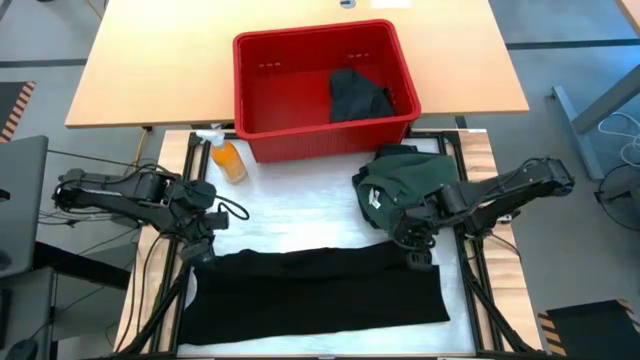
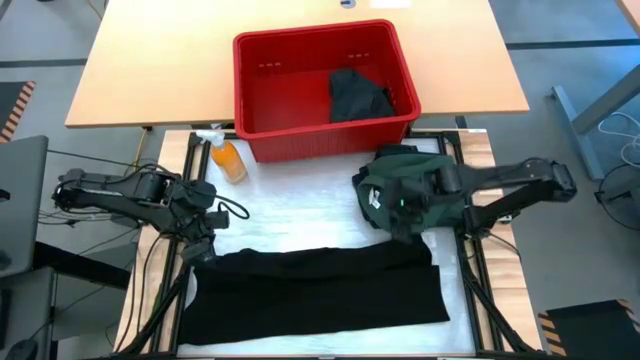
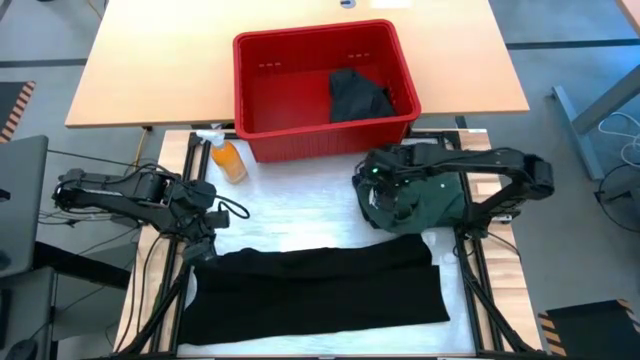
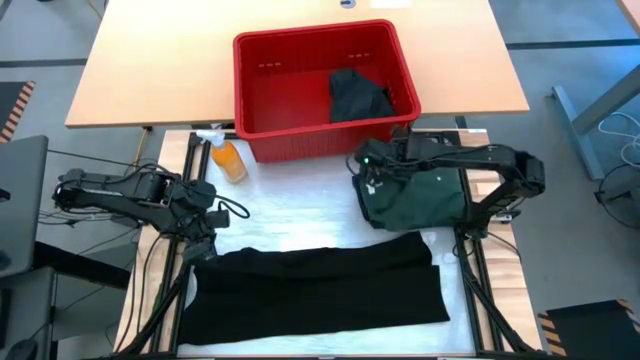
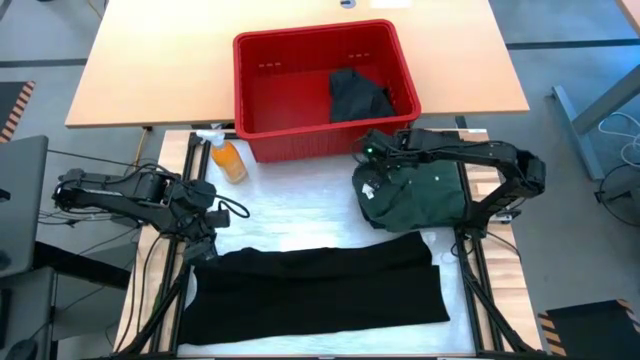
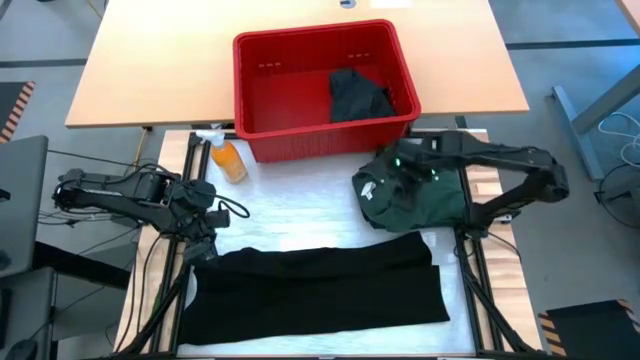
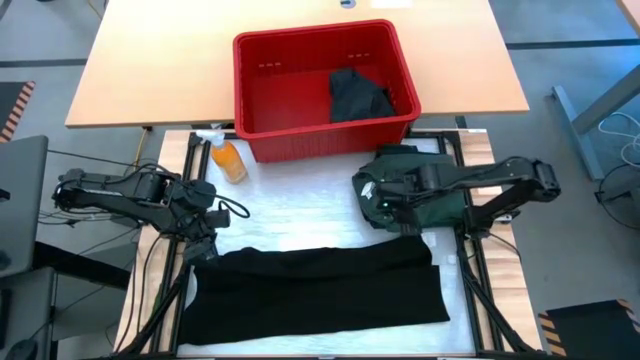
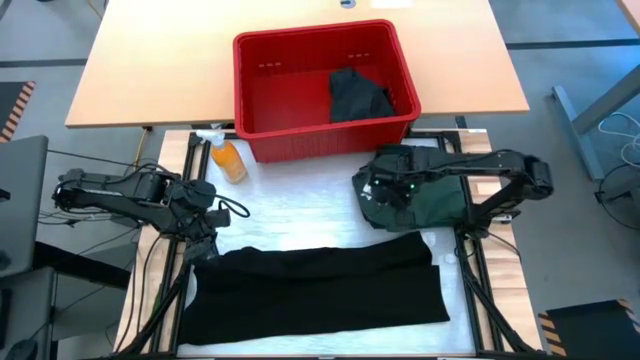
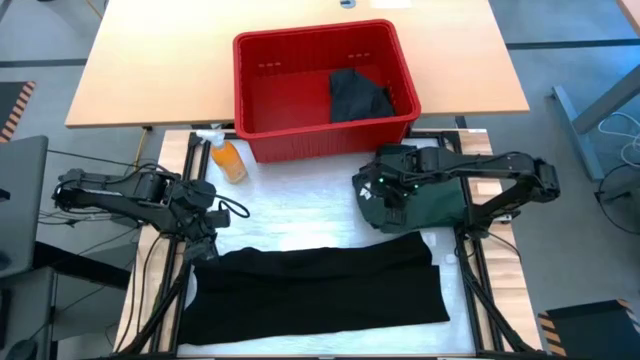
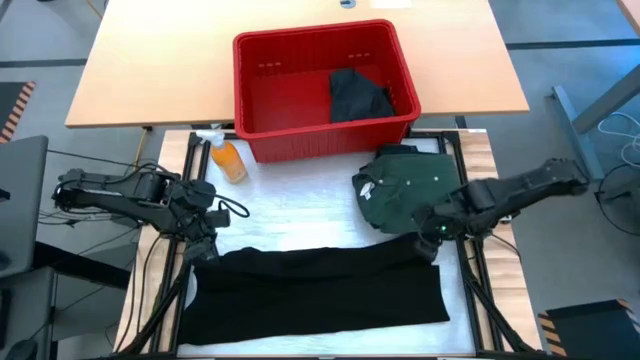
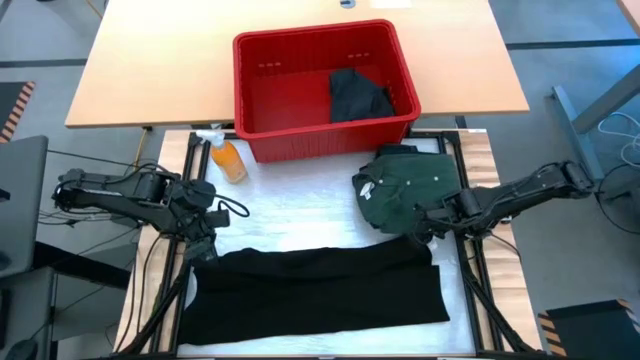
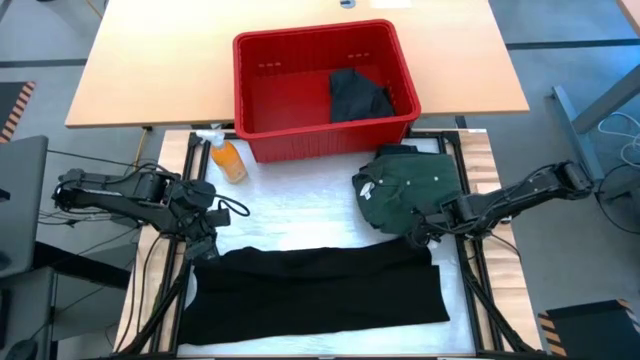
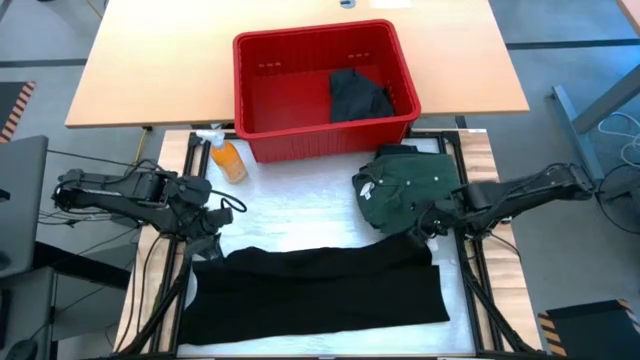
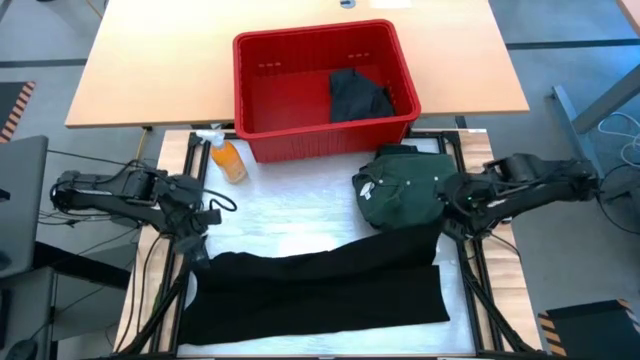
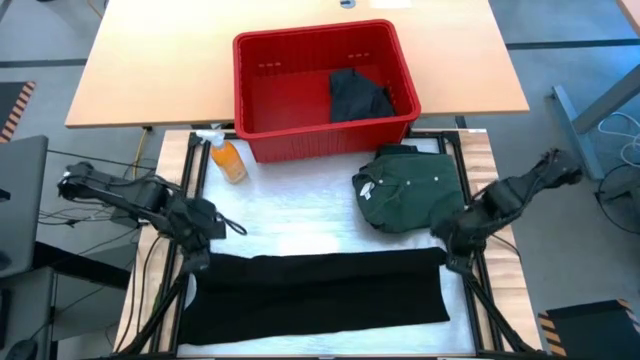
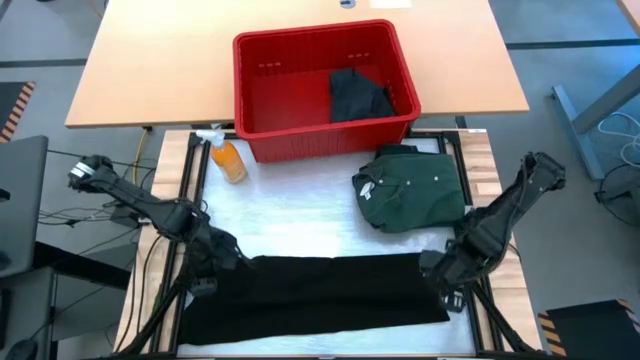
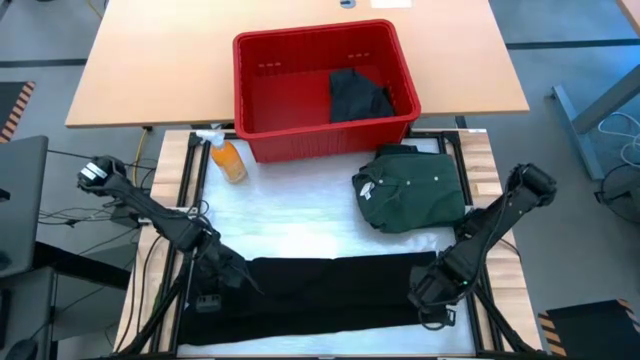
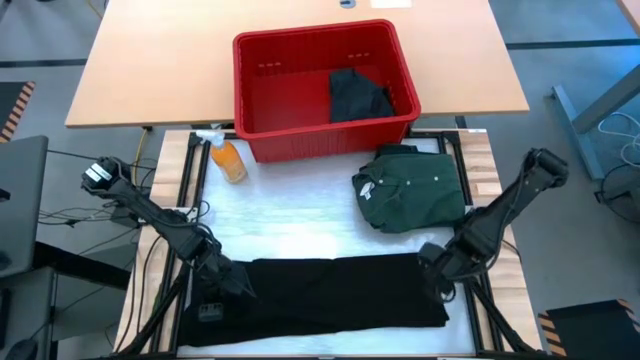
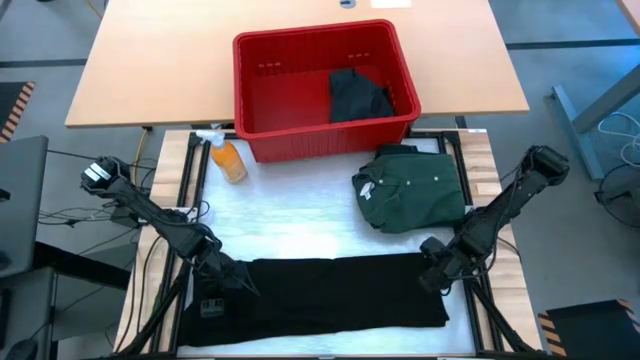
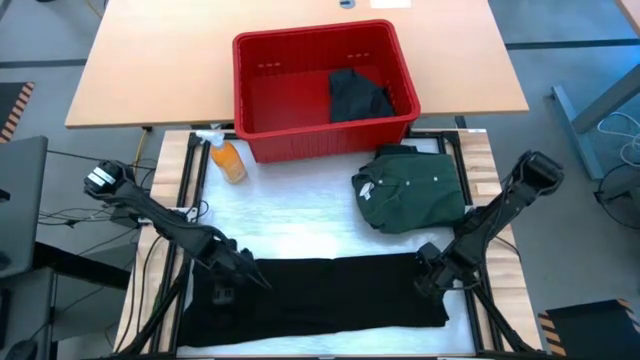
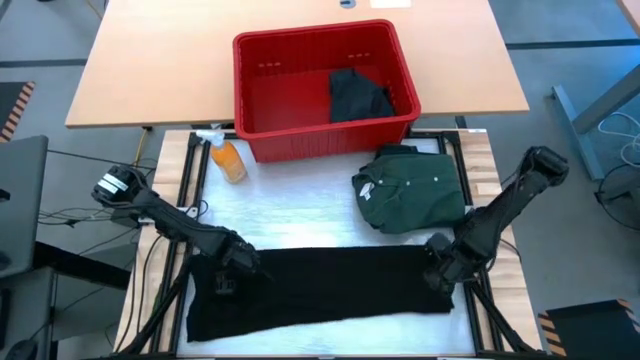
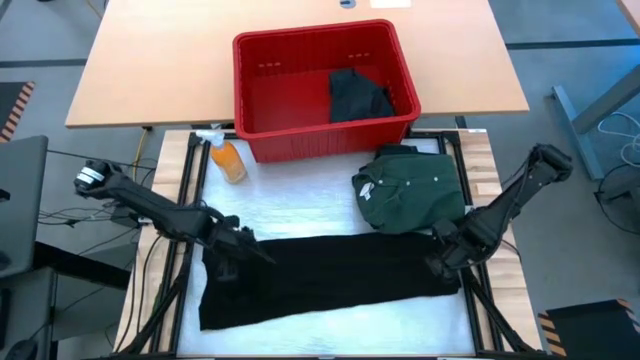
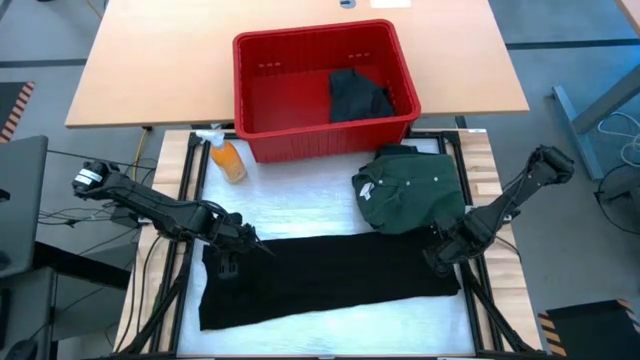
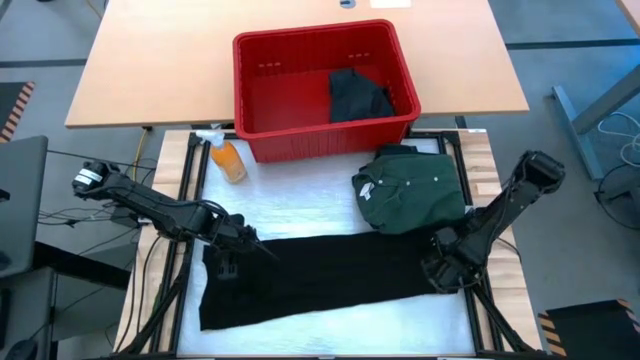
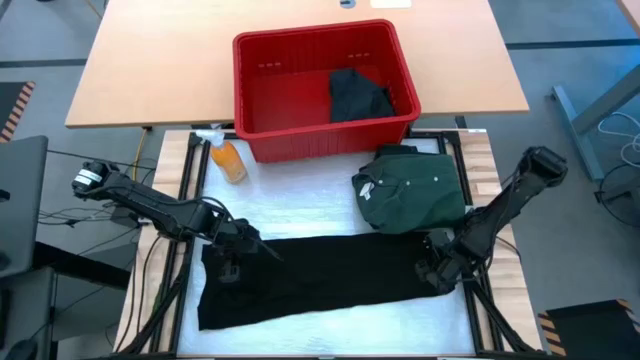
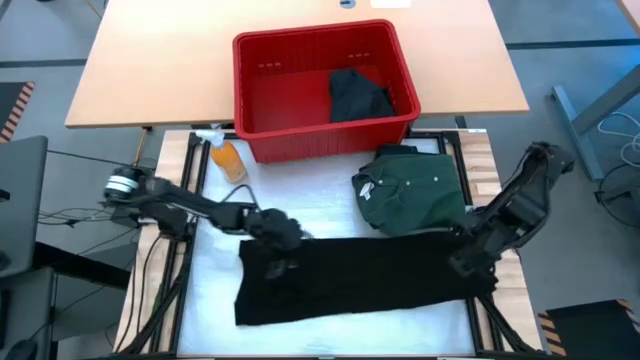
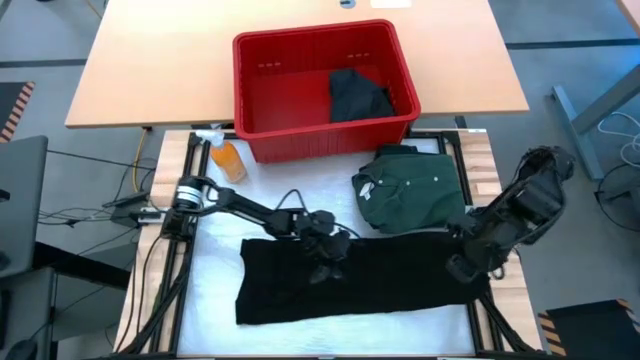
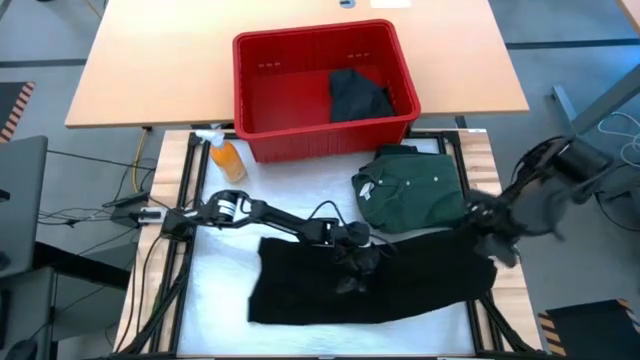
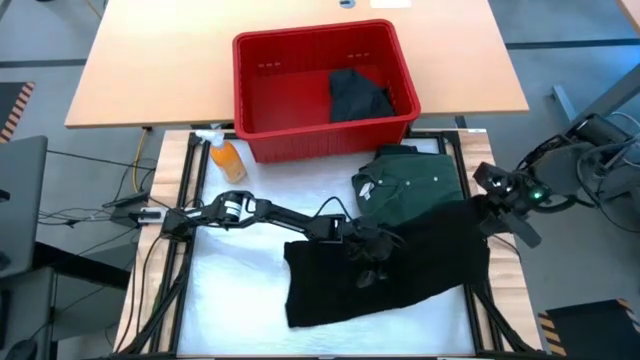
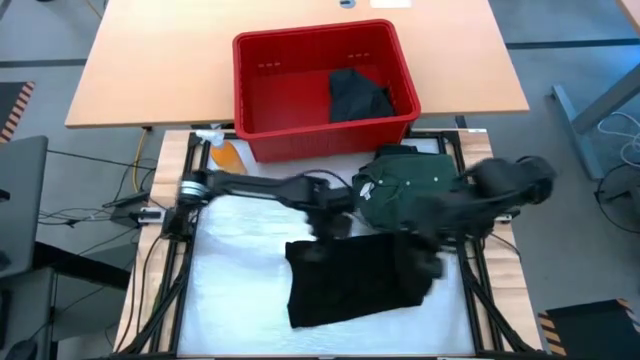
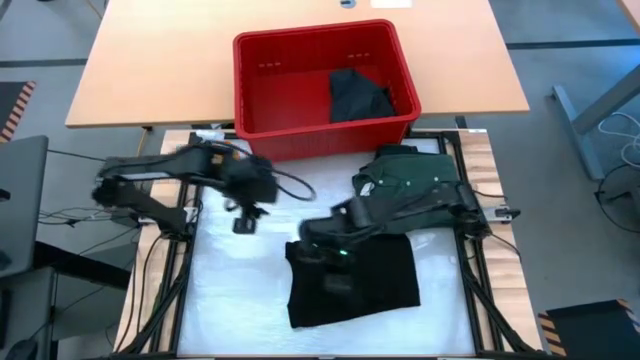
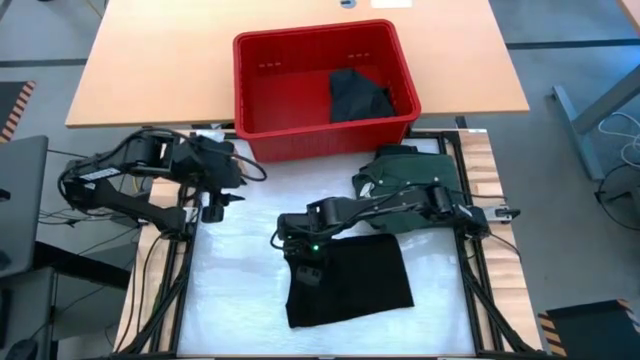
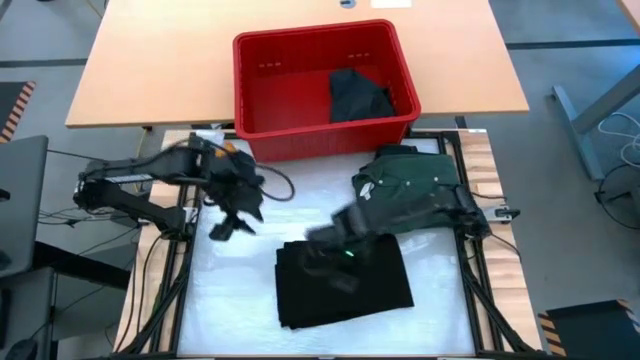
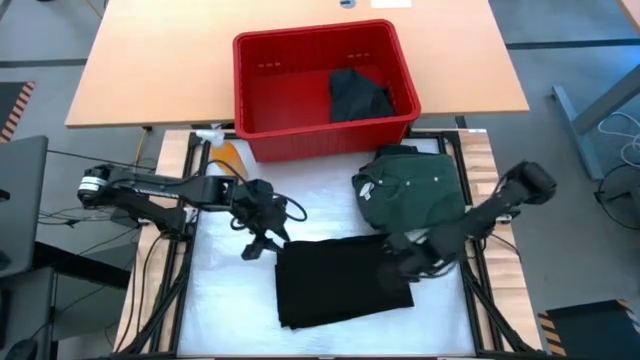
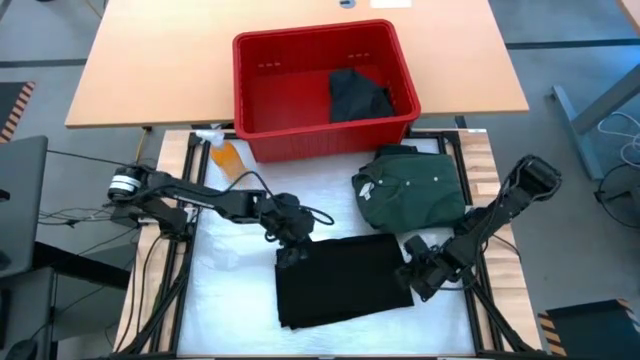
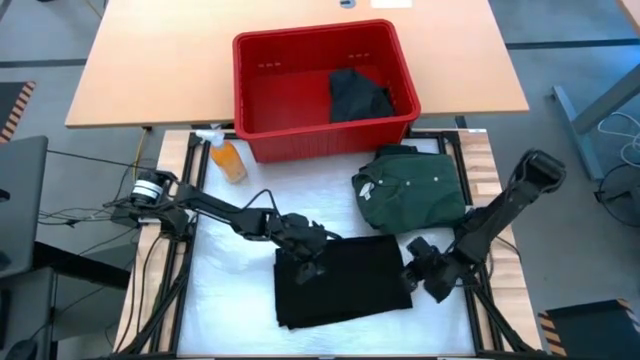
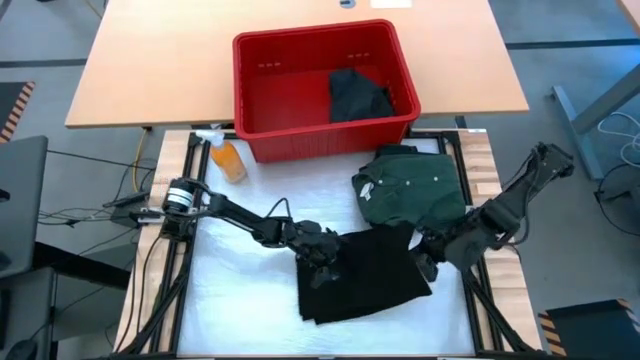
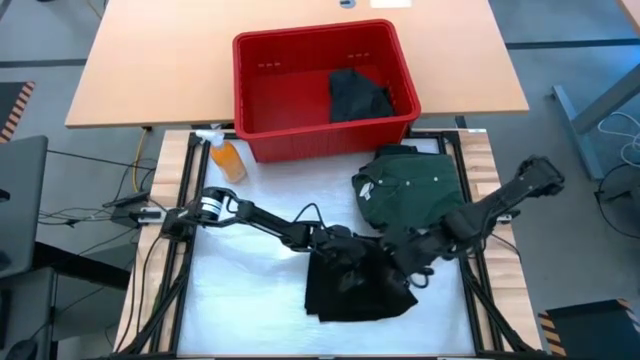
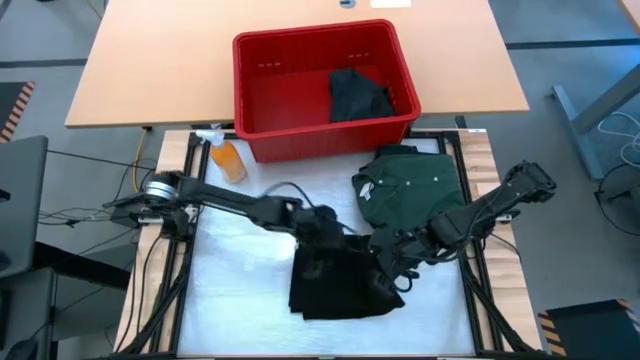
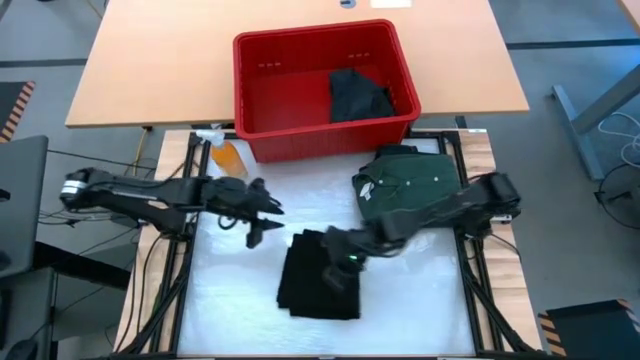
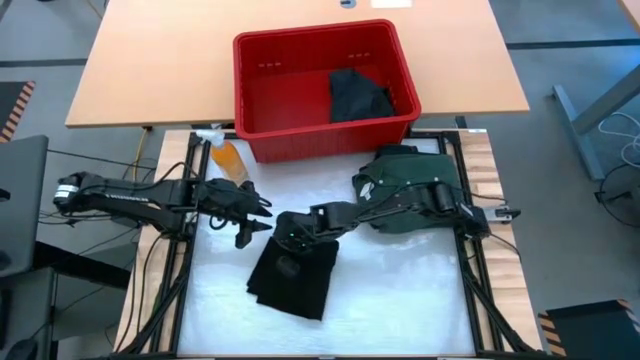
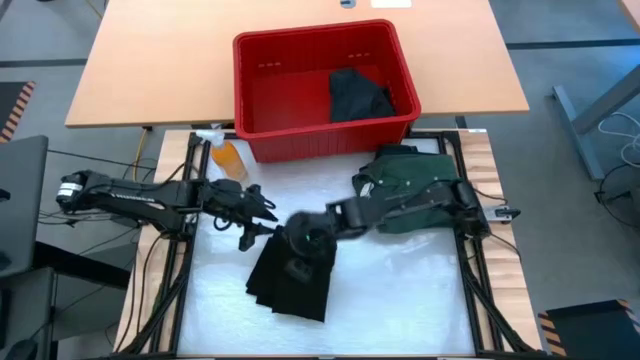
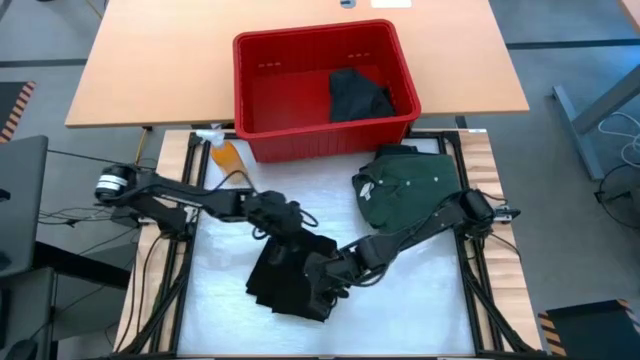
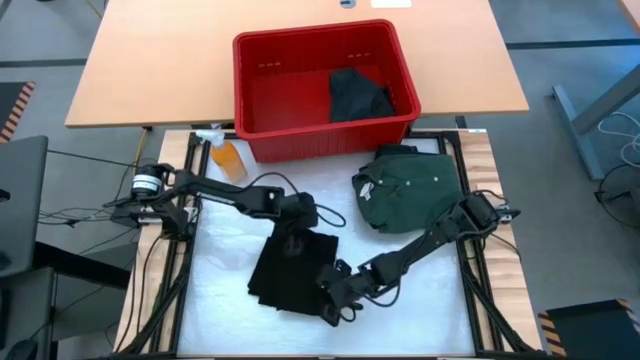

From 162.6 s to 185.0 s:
Task: Fold laundry
Fold the black shirt
